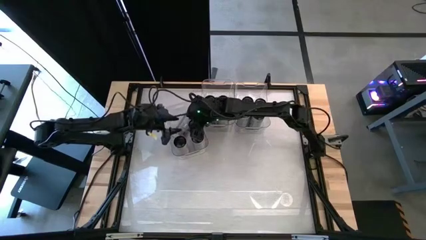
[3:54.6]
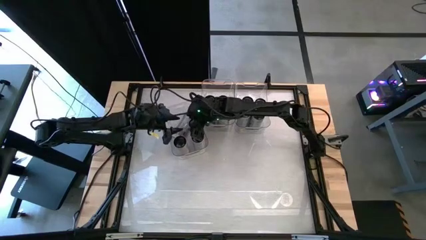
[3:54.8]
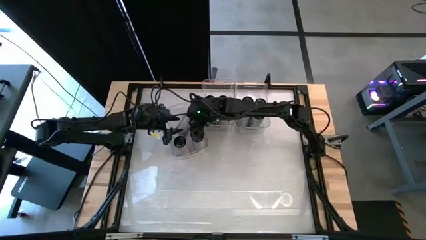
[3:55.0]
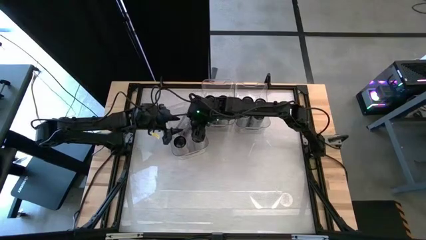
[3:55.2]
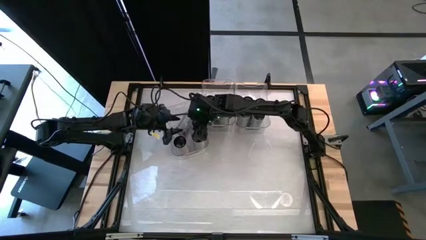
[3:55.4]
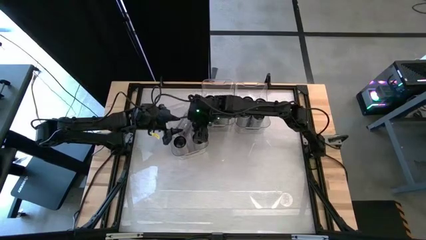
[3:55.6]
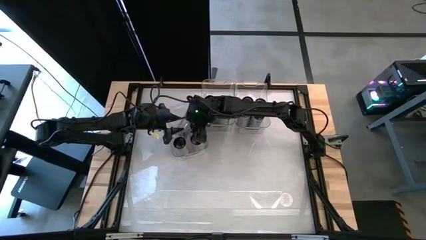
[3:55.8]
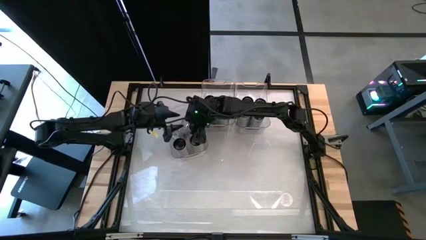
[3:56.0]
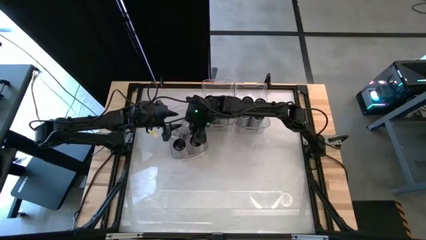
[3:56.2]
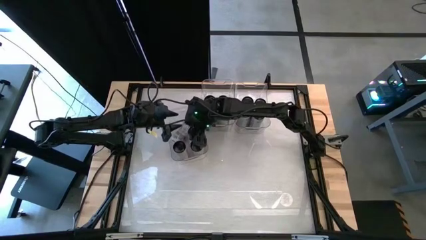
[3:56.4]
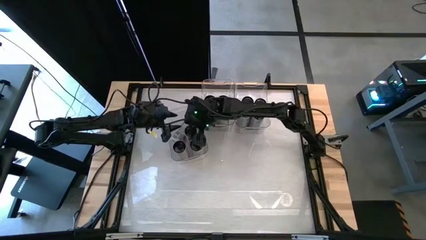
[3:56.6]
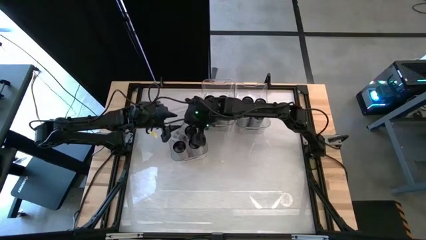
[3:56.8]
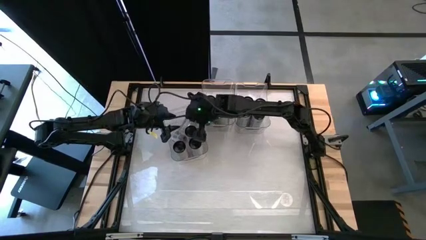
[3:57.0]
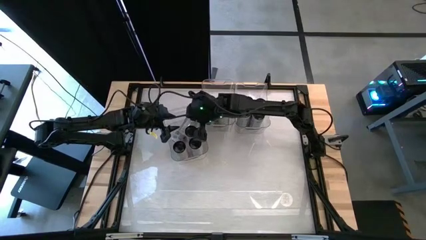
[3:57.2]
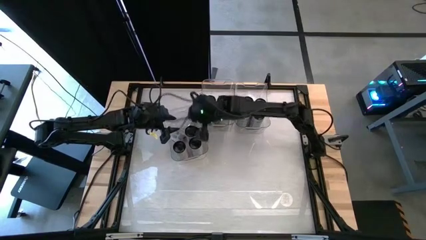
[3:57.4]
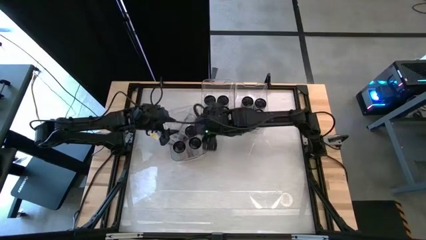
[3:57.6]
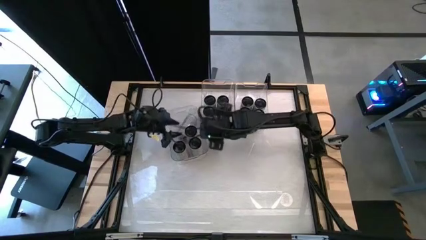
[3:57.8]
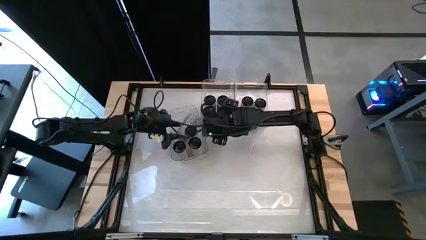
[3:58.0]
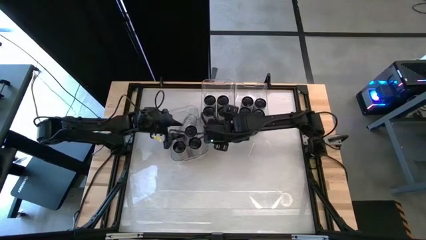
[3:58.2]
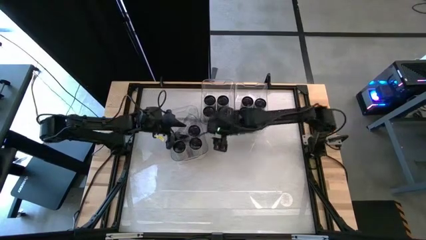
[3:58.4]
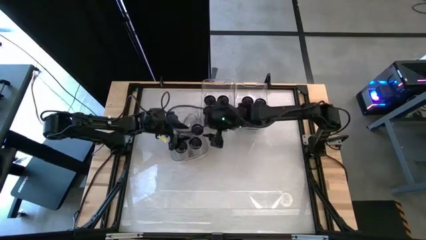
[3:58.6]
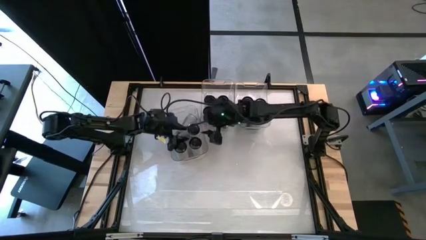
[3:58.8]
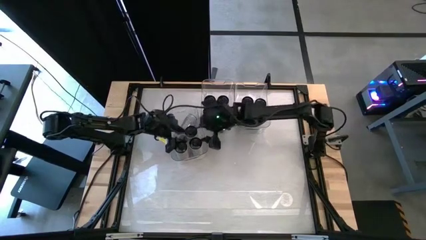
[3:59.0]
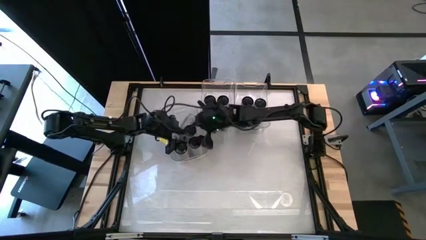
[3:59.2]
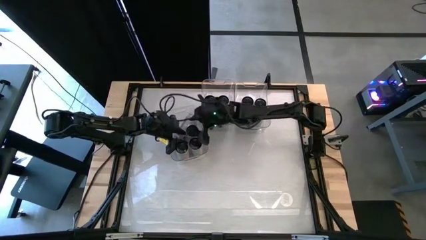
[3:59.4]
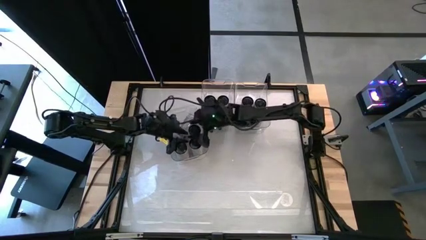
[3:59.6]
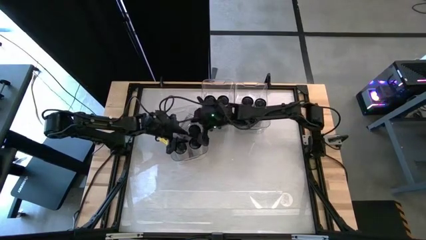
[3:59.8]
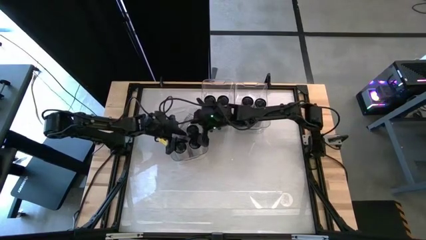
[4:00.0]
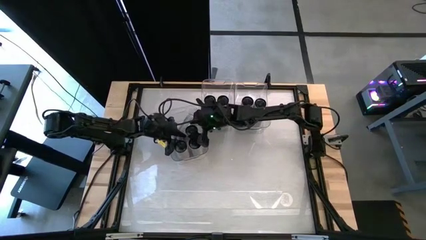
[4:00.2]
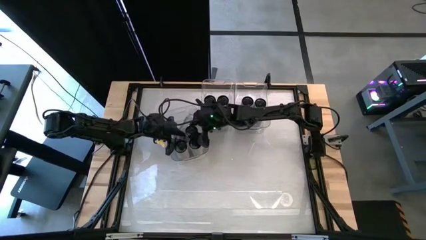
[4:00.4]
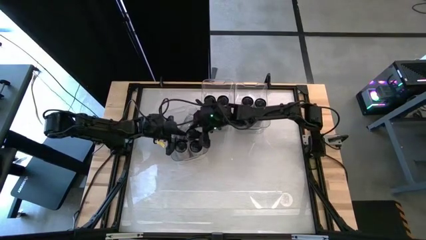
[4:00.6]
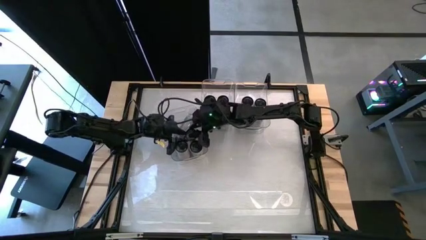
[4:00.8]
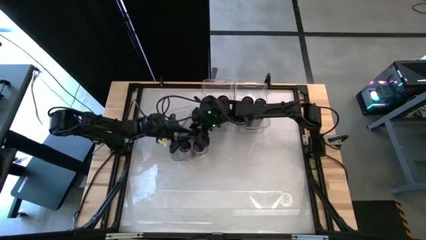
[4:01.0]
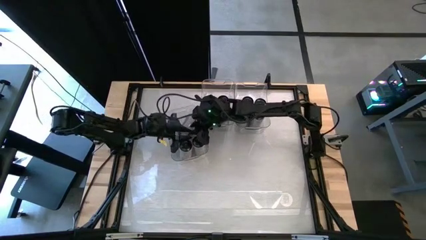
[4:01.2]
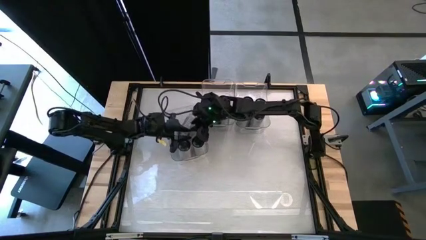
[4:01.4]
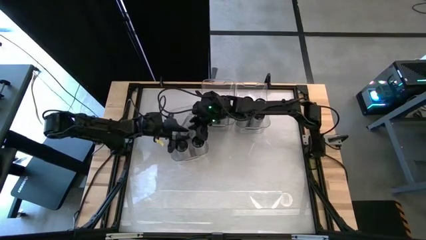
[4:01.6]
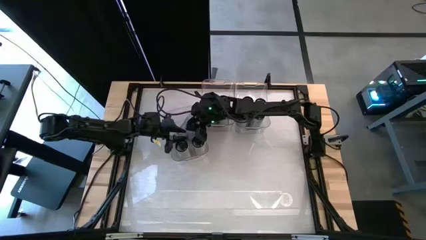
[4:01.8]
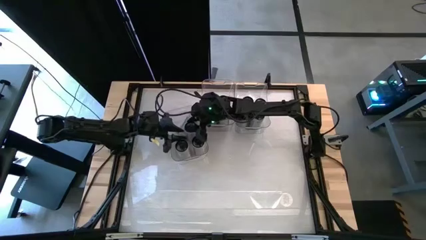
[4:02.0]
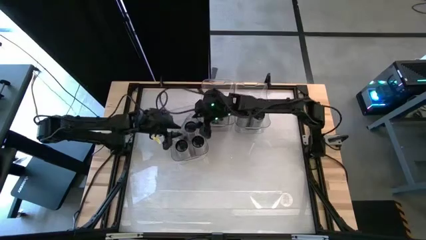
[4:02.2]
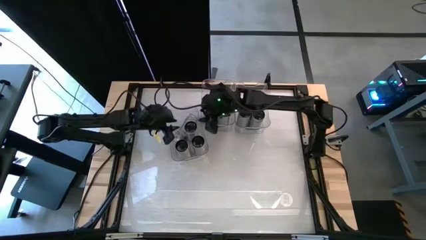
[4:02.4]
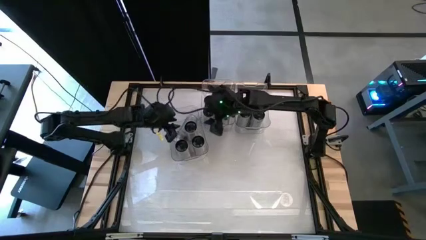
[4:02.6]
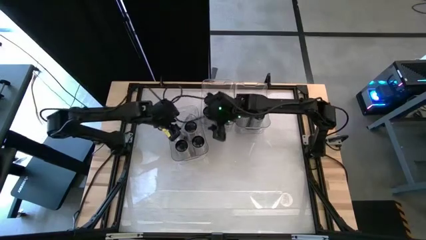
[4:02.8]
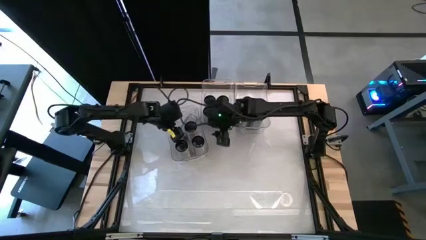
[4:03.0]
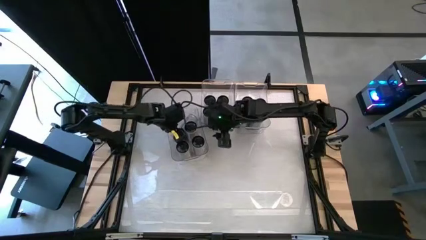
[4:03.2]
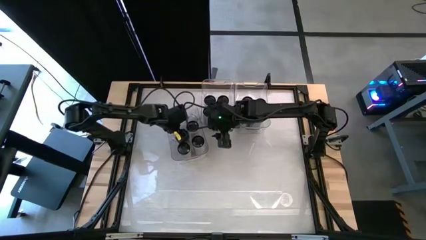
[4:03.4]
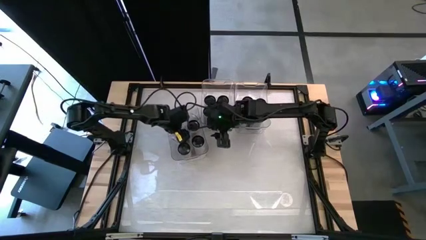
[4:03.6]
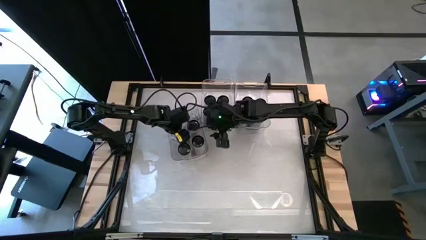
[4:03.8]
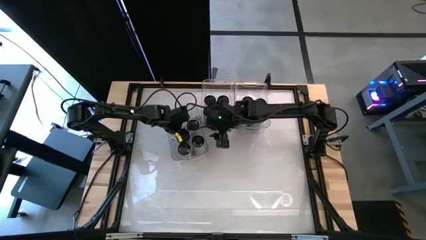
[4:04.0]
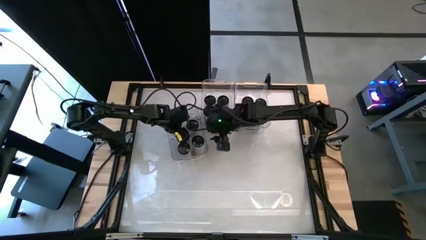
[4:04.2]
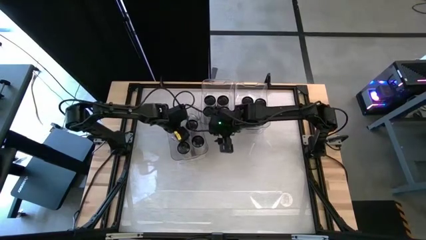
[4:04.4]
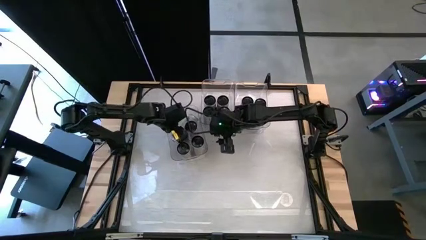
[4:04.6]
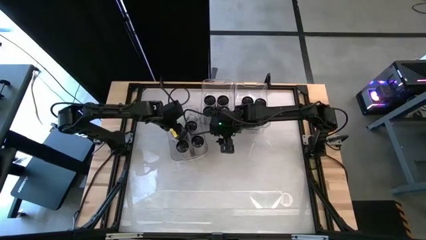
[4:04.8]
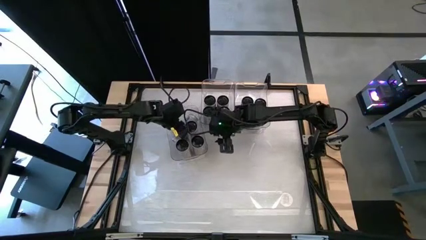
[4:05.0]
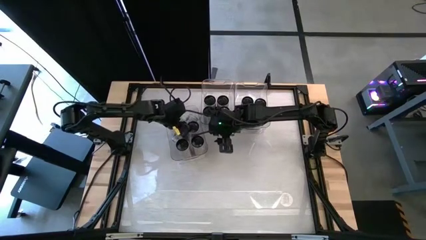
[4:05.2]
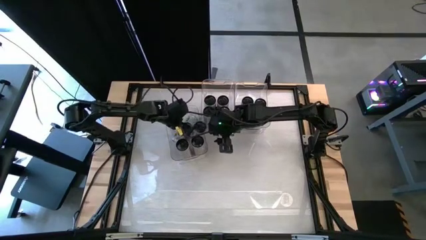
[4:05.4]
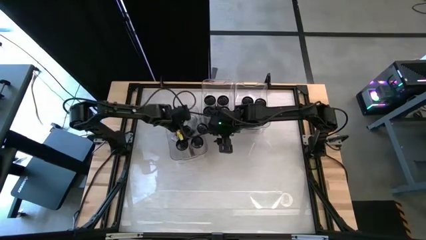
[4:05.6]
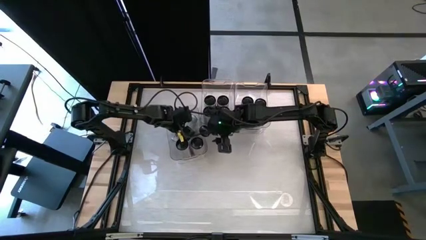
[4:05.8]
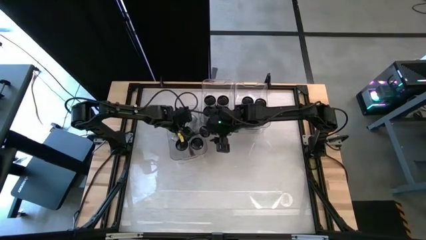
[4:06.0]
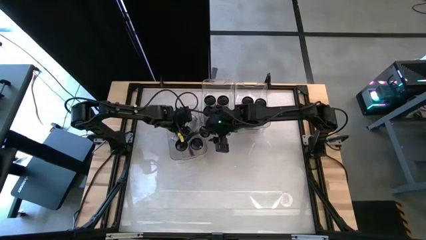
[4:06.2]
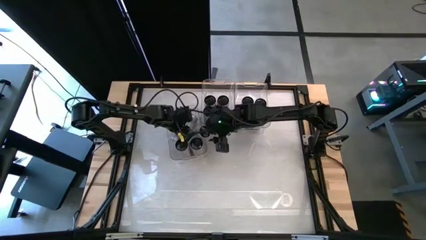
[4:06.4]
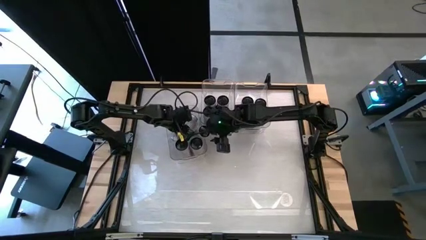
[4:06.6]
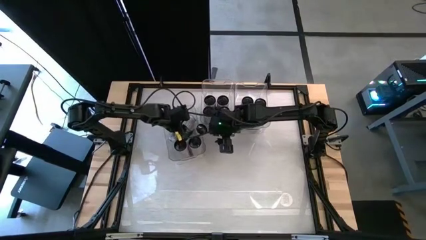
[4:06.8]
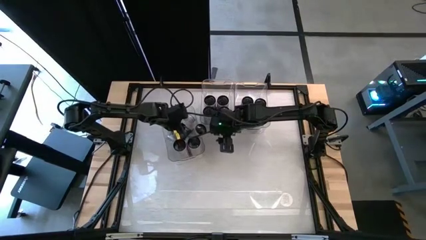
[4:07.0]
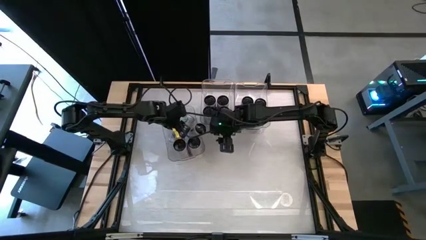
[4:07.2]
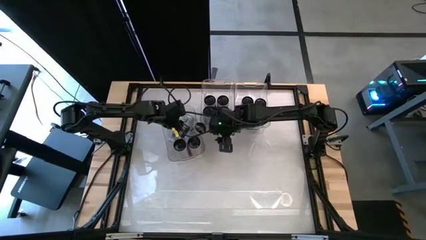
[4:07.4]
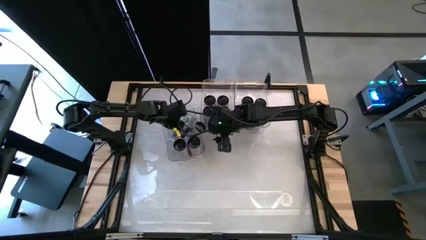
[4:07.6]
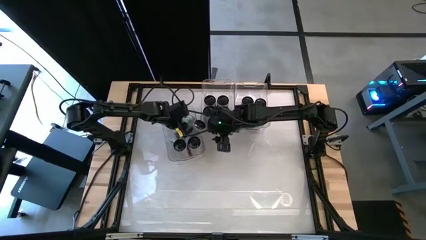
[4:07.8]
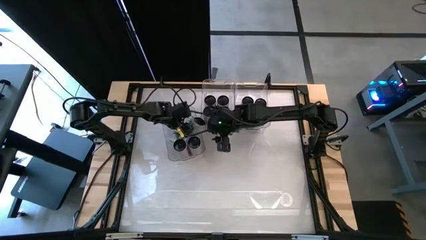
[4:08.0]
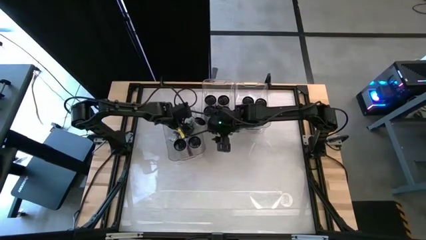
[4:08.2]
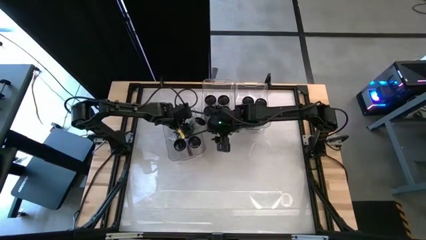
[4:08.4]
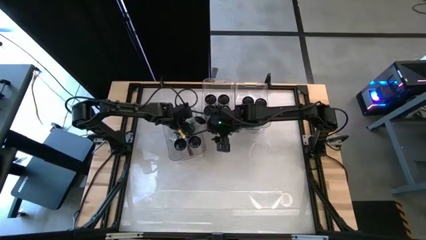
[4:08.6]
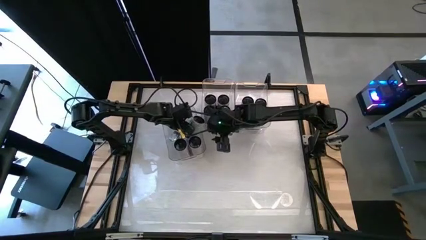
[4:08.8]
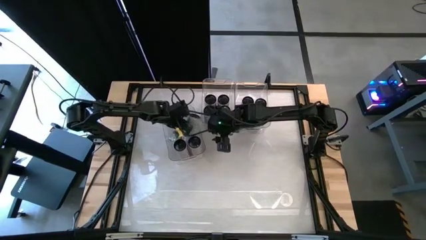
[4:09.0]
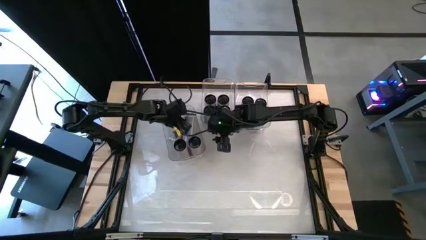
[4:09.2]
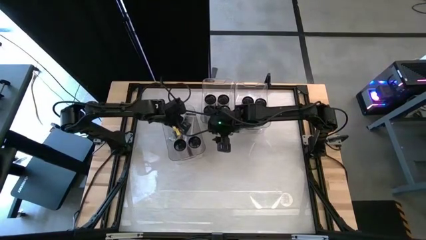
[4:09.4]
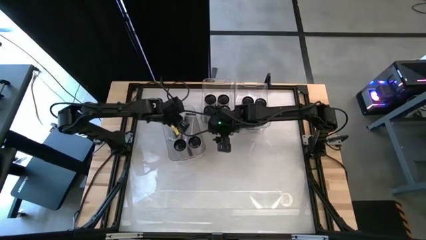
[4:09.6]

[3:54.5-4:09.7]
Task: Sort soda cans
Adjust the white pink soda cans
